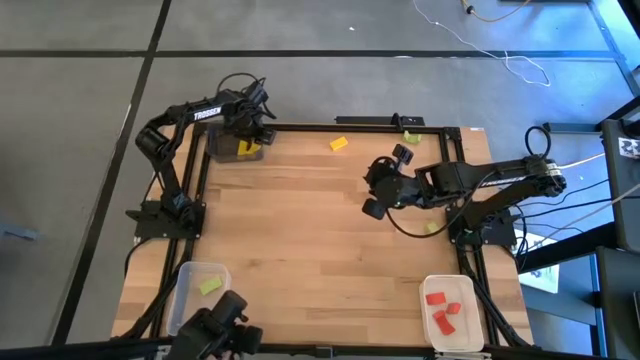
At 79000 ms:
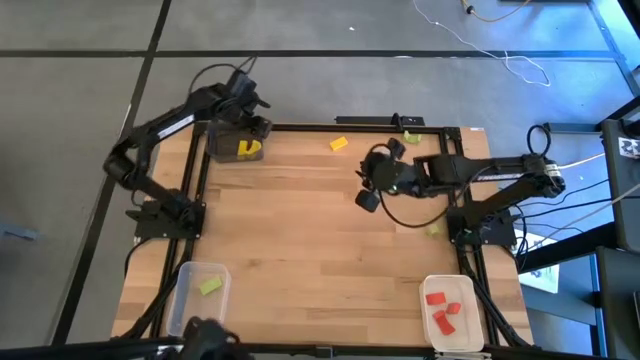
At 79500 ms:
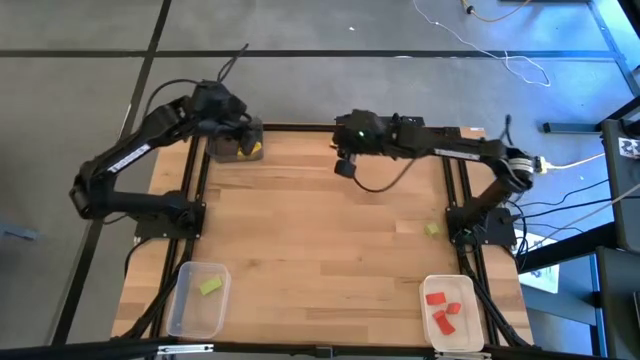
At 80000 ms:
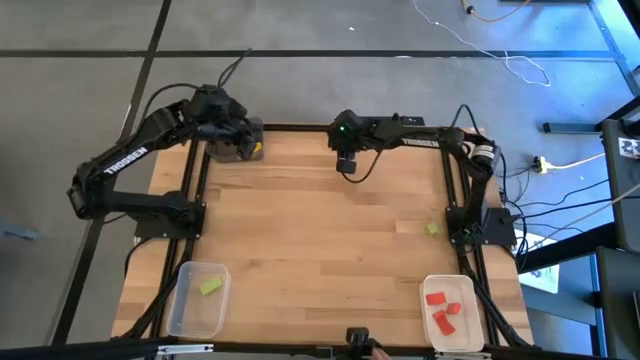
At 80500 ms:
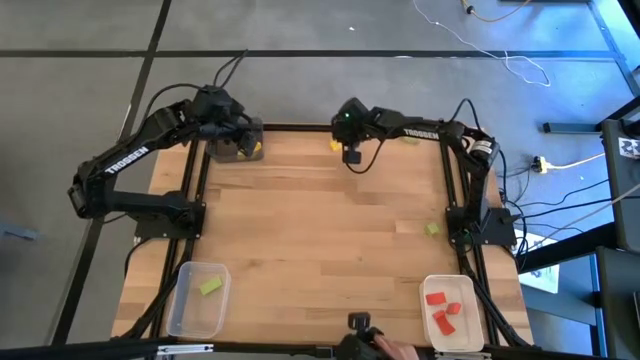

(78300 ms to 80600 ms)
Task: Sort & place blocks by color
Put the yellow block into the black bin

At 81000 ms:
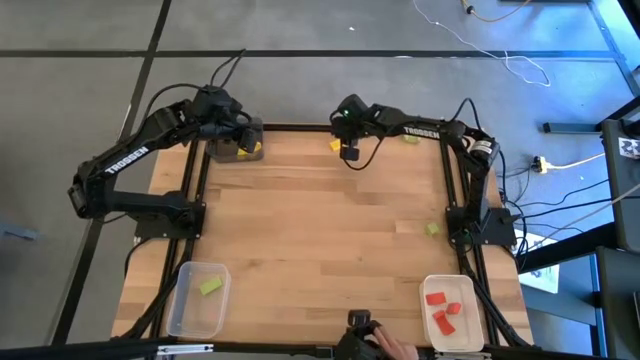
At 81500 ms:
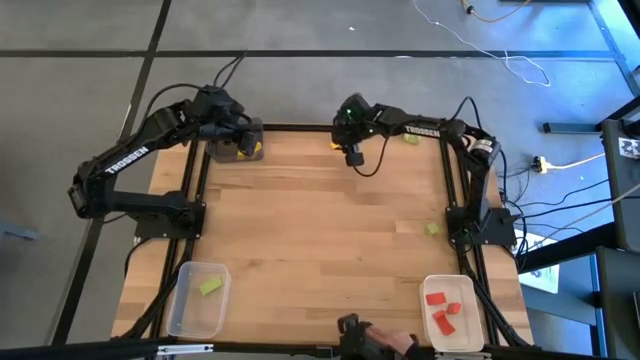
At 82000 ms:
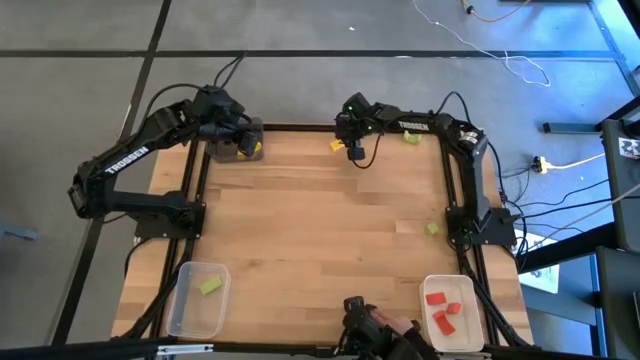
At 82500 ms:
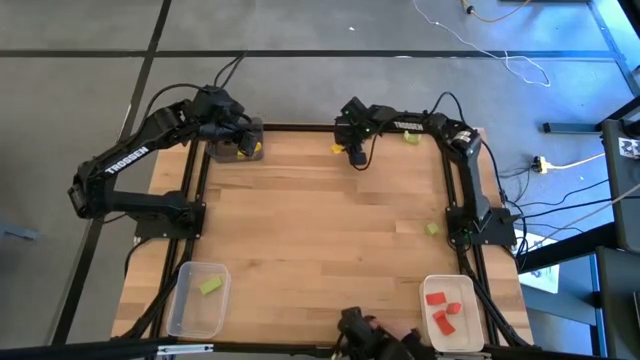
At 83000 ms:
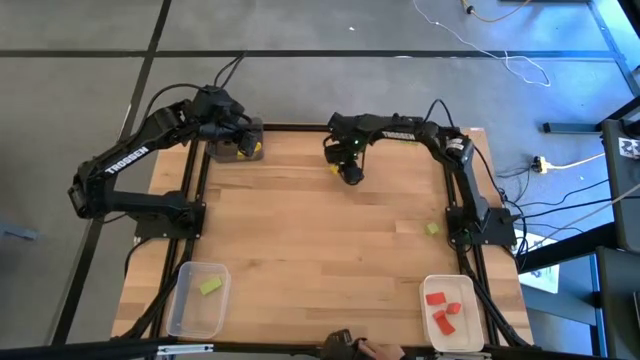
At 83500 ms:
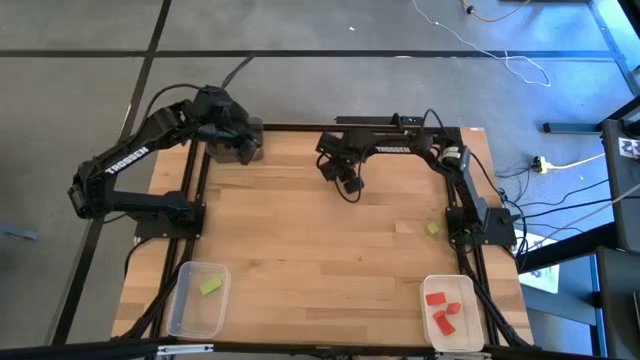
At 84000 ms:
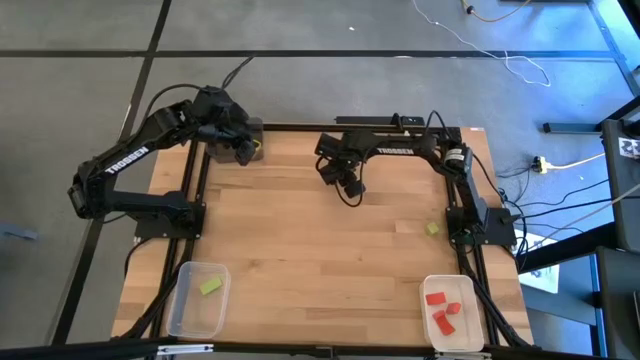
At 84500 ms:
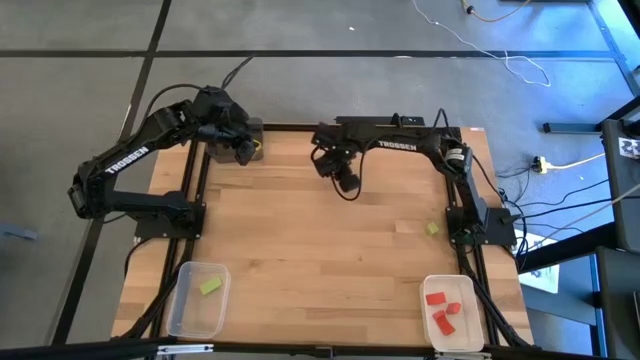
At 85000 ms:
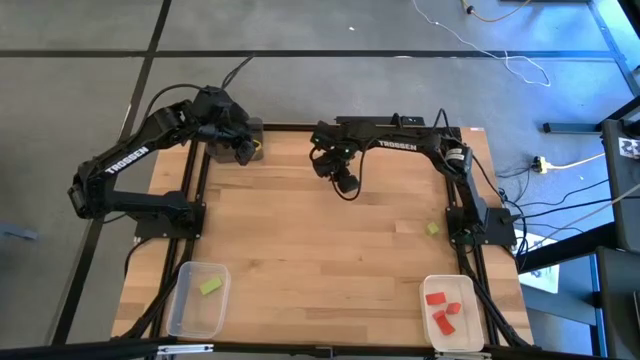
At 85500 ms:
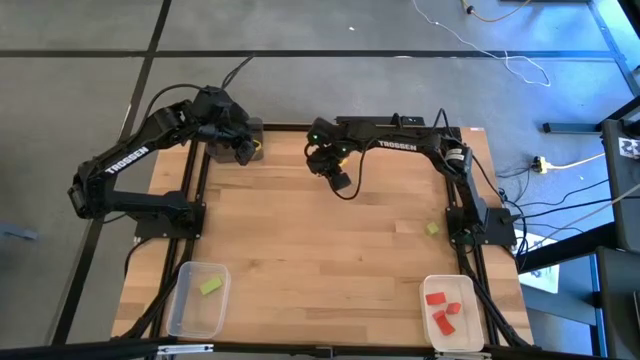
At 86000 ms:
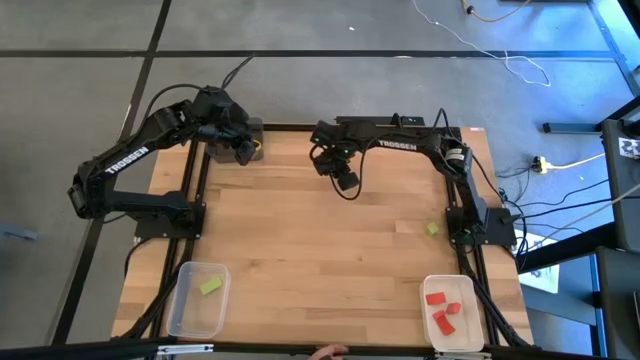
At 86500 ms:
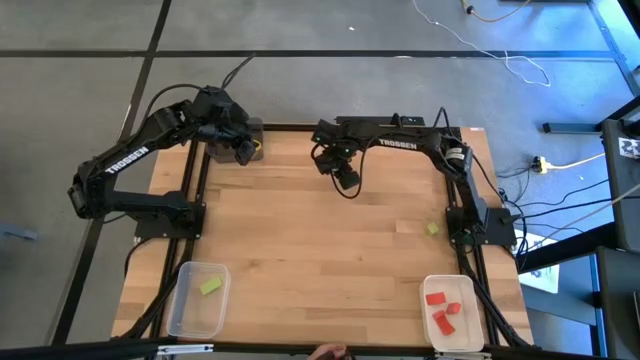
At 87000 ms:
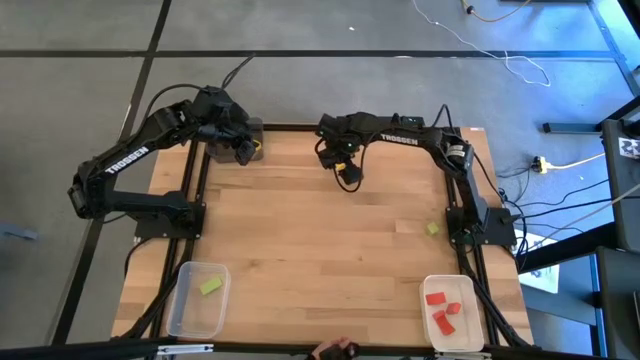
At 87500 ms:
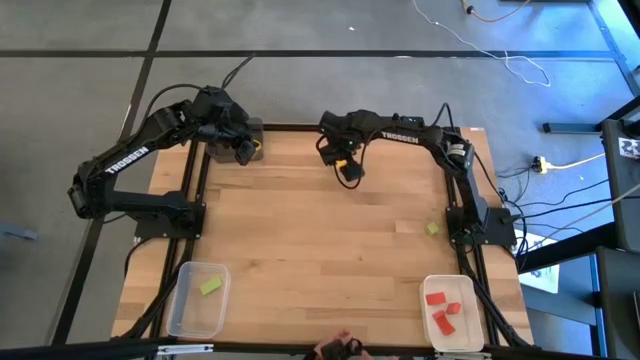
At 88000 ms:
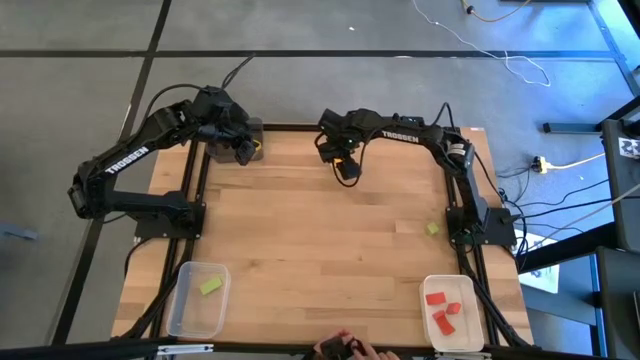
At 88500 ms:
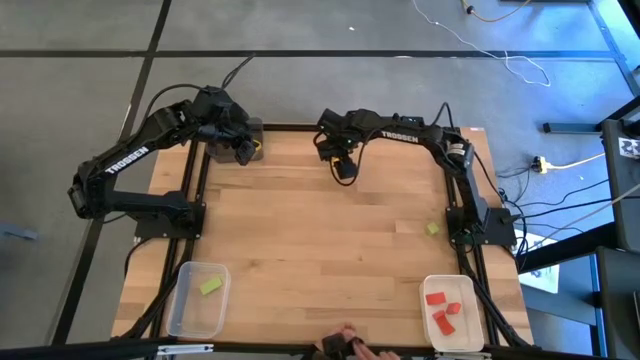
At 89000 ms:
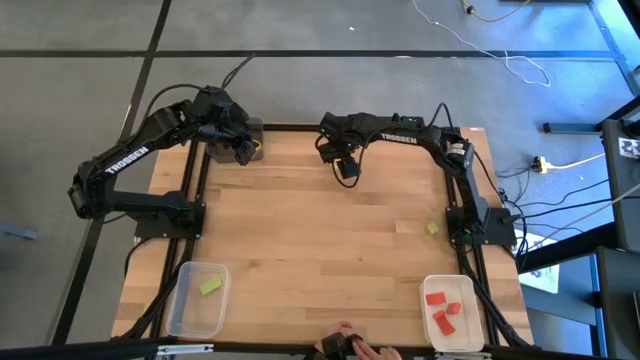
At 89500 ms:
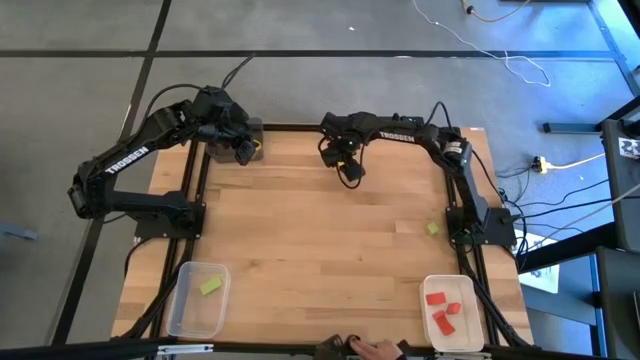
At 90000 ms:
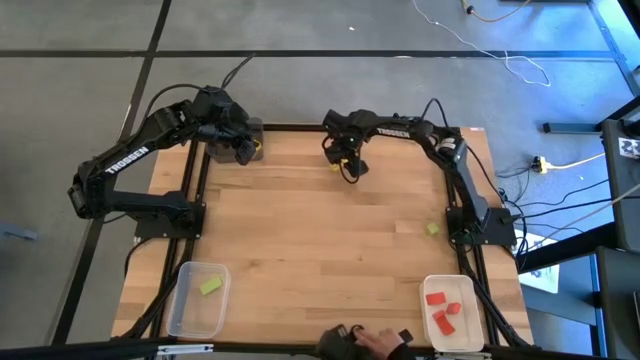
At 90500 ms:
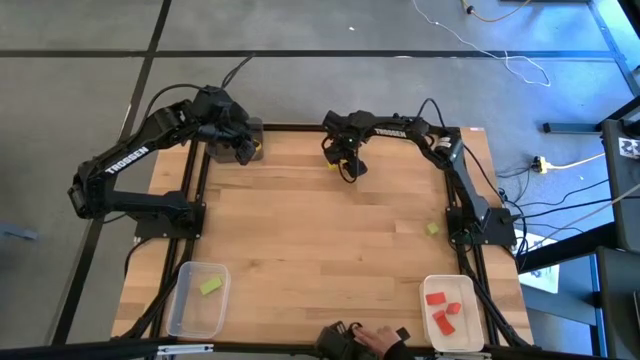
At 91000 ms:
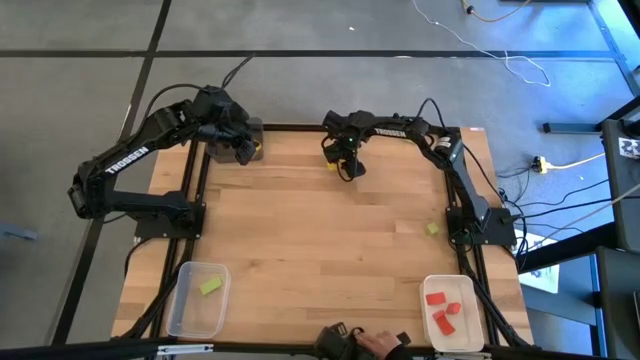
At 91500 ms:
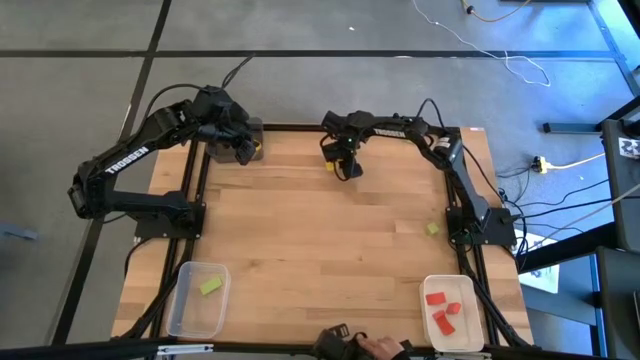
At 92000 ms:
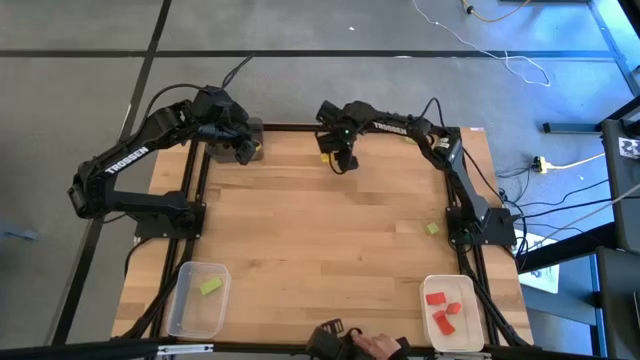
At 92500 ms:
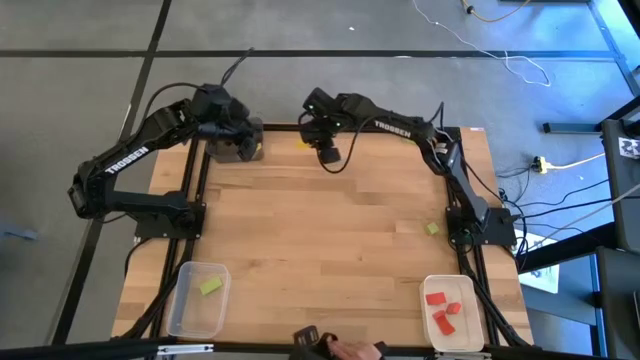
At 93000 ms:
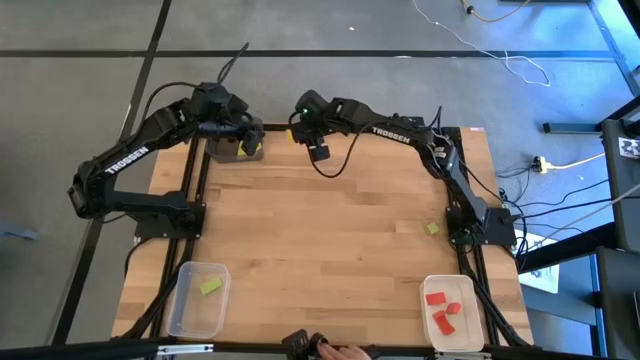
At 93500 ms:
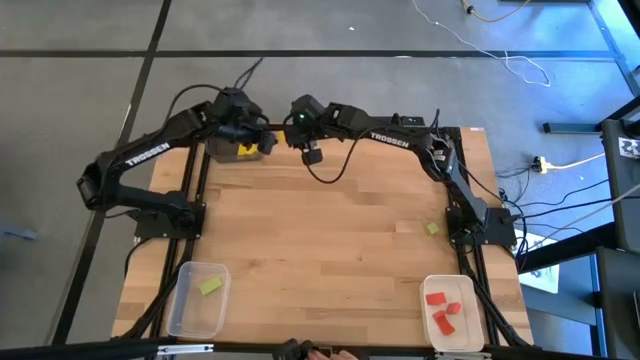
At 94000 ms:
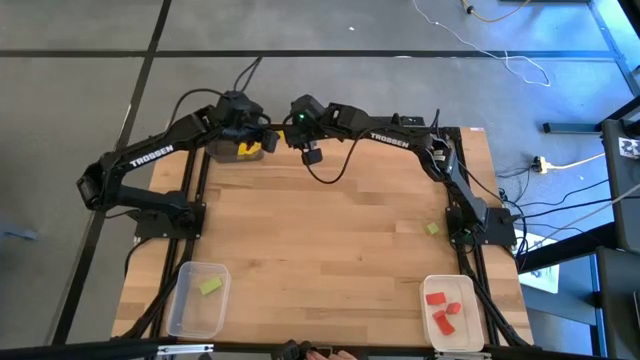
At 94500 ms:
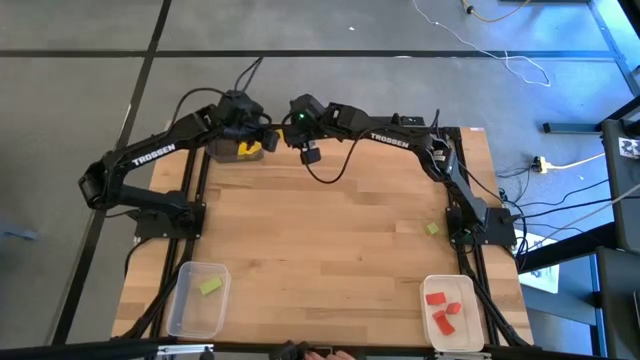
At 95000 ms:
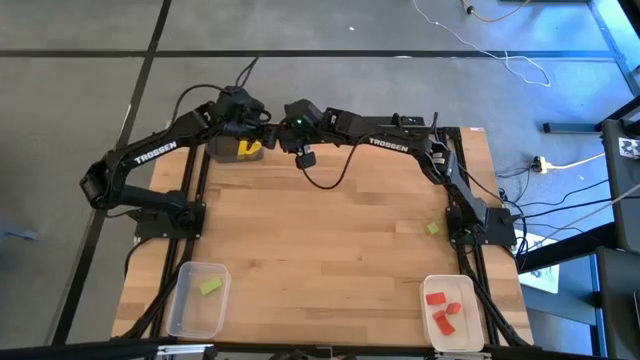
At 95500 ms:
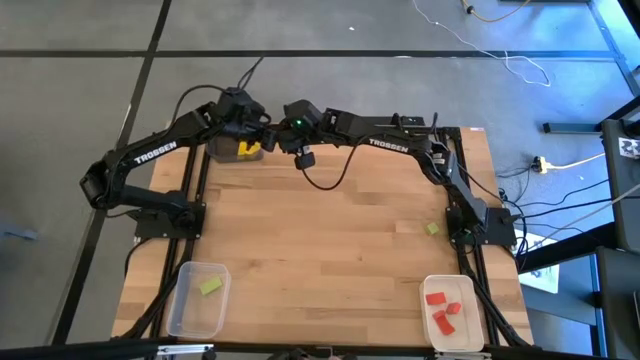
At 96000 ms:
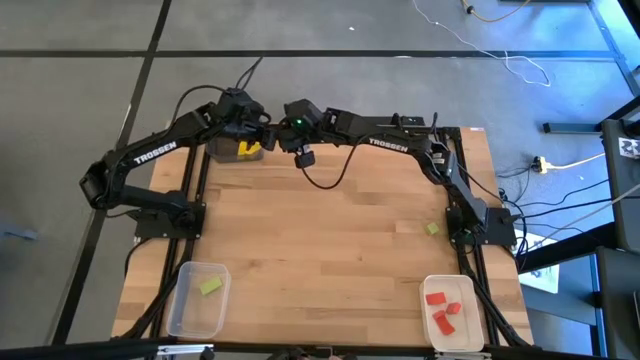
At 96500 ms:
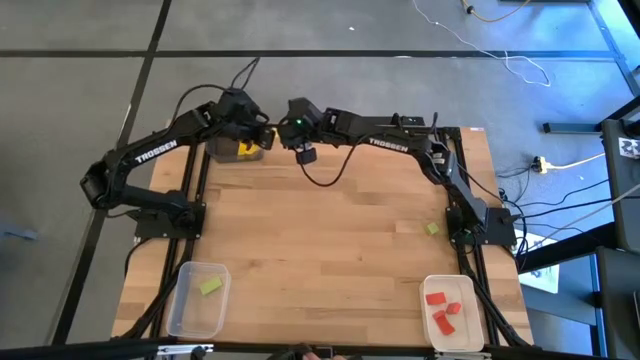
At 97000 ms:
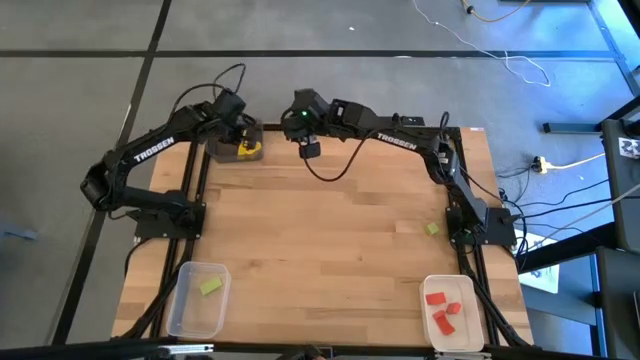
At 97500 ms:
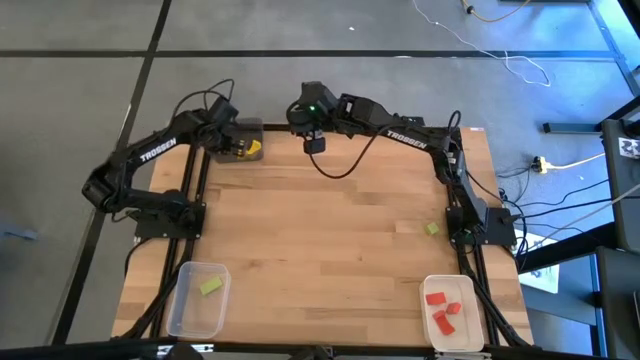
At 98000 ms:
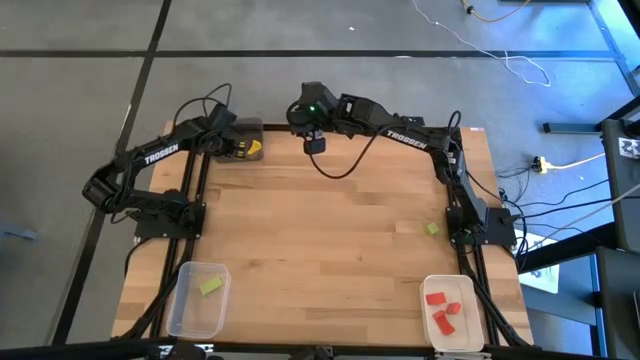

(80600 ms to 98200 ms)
Put the yellow block into the black bin

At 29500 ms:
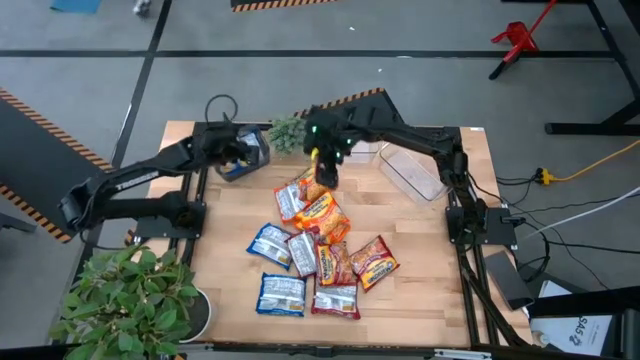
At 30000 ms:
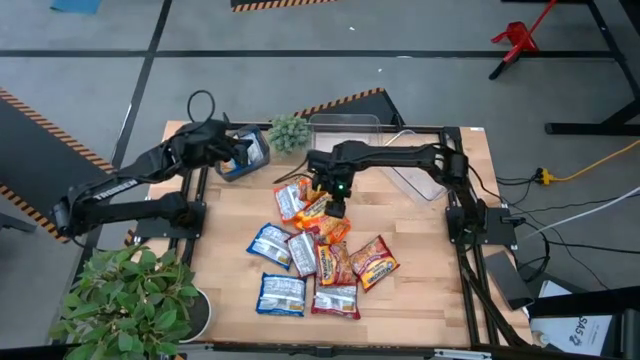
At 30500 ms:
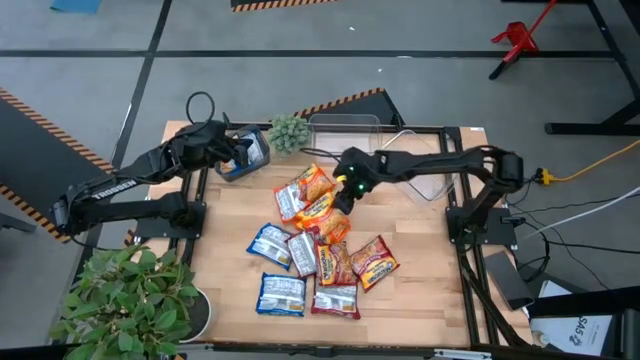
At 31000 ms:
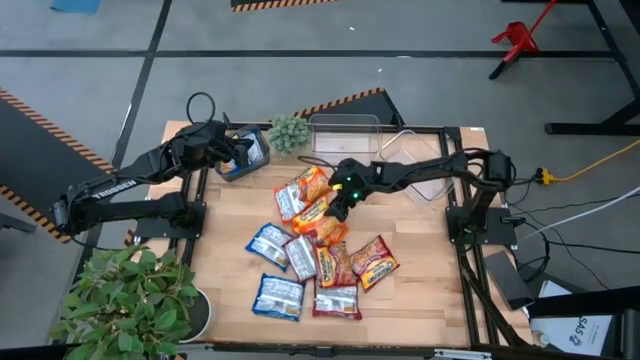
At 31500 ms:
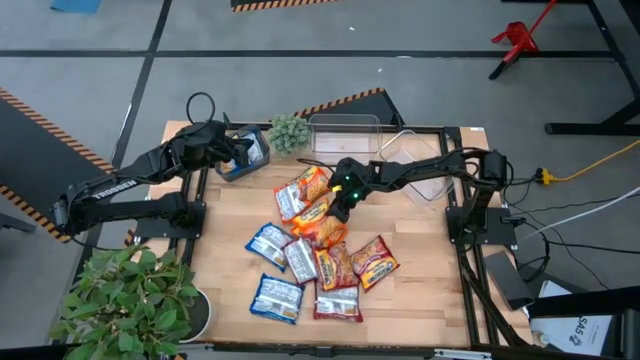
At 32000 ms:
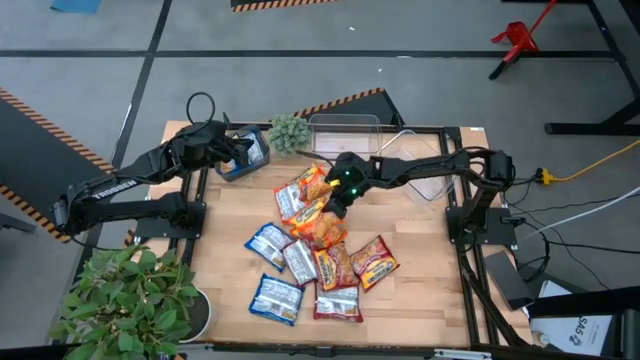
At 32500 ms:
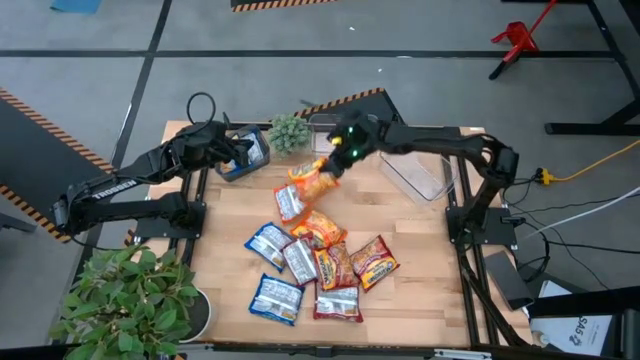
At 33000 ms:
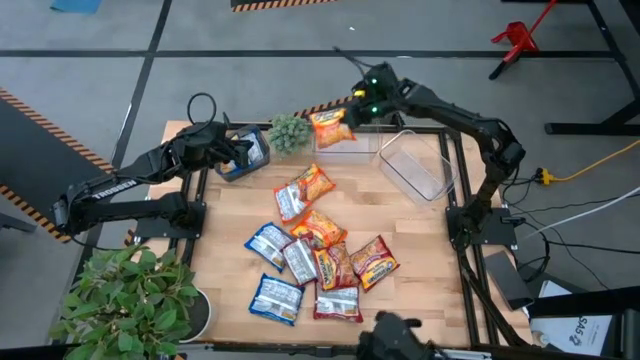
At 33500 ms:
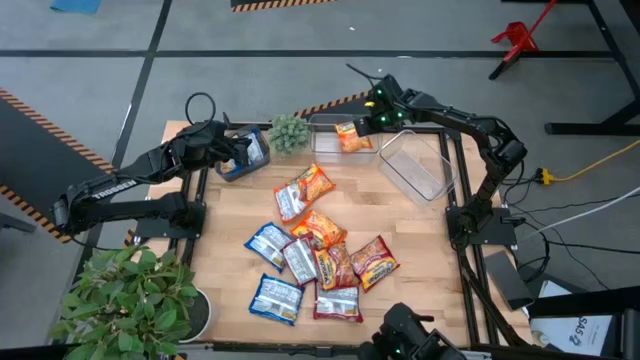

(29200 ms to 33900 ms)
Task: Sort Maruchan noodles
Put the orange noodle pack into the left transparent bin
